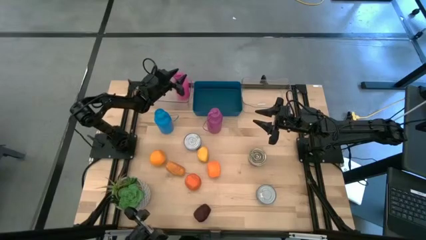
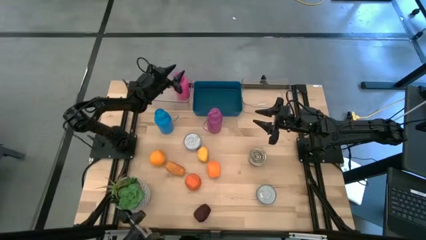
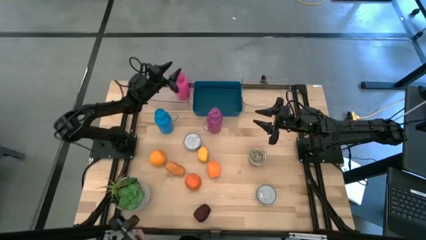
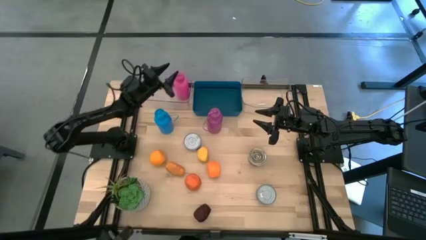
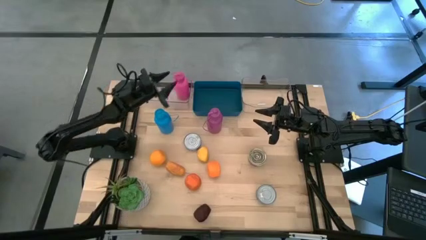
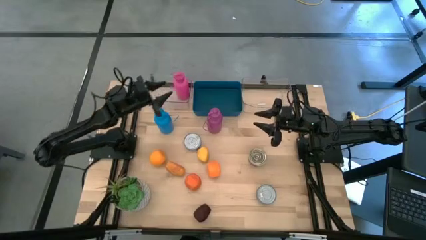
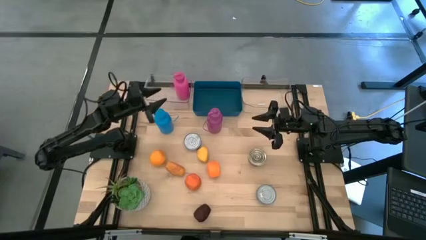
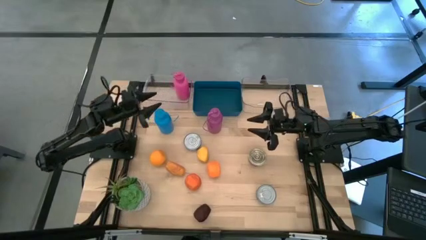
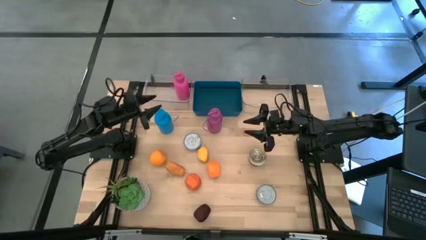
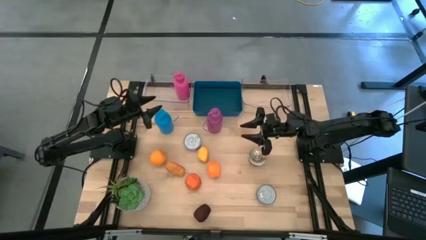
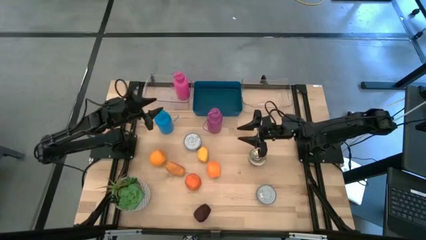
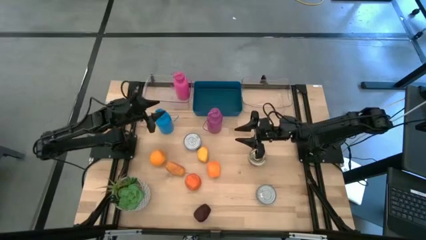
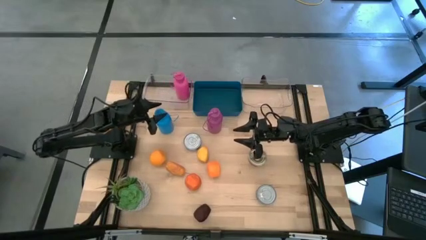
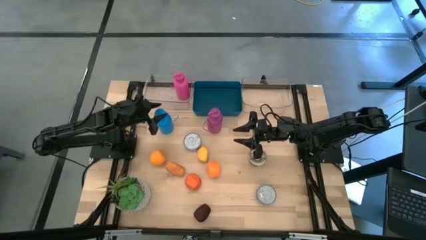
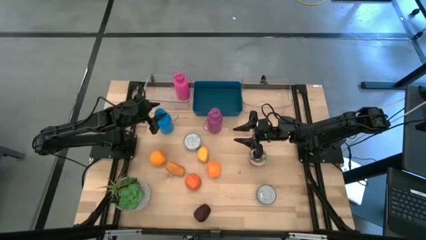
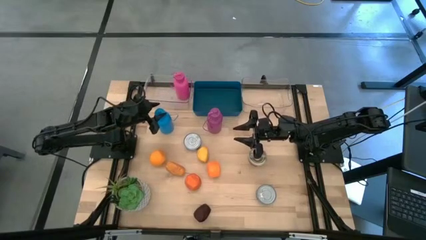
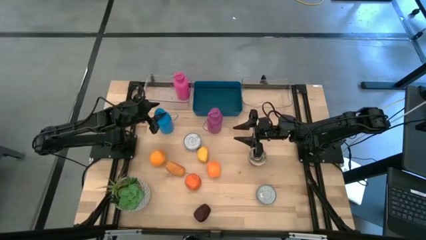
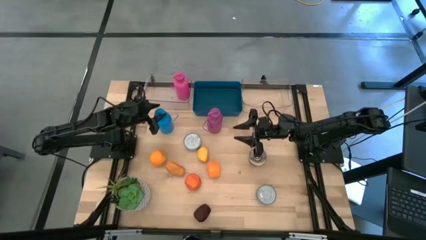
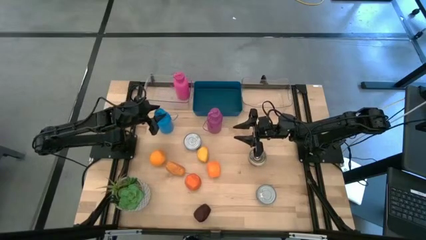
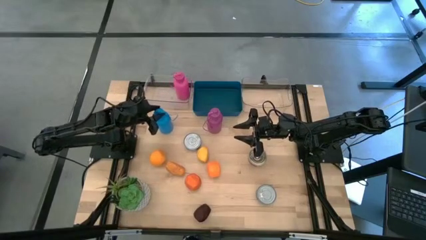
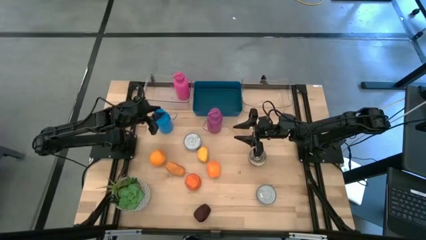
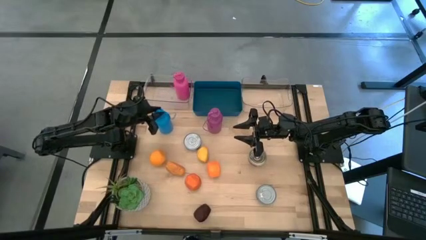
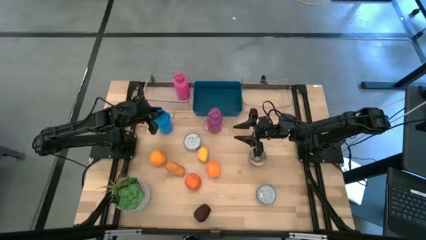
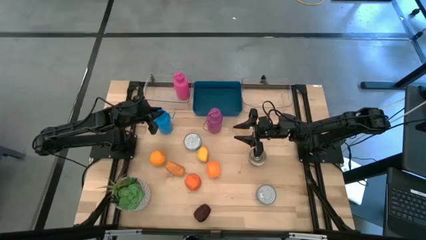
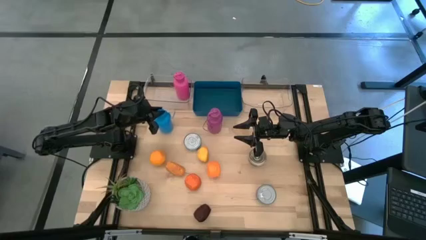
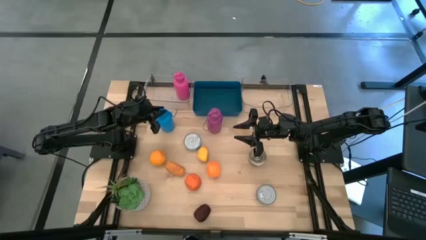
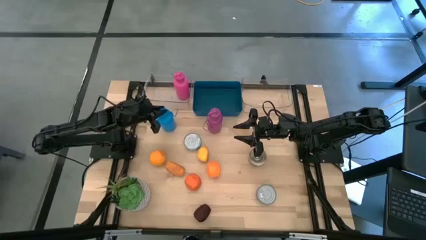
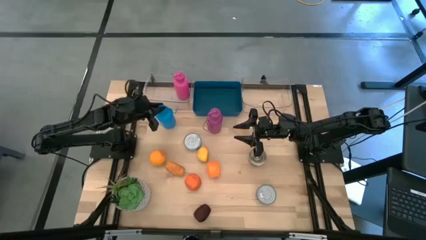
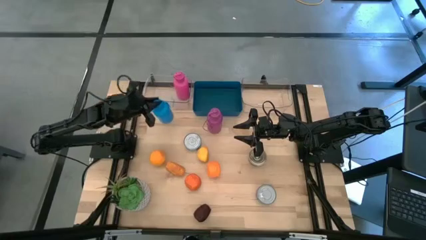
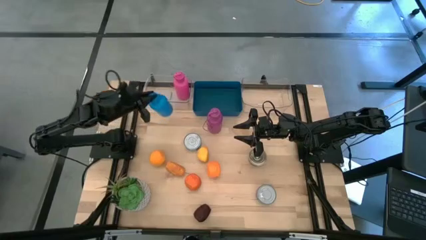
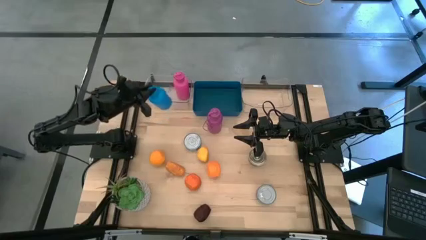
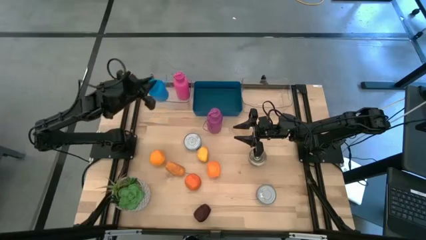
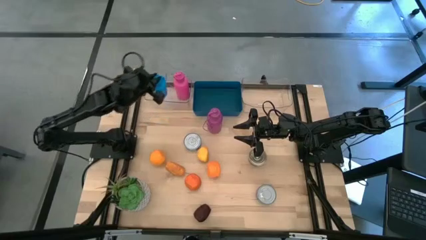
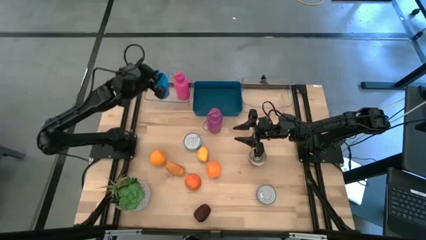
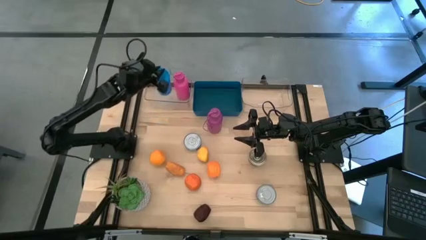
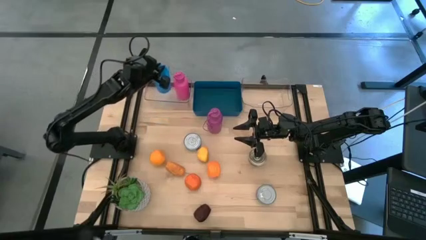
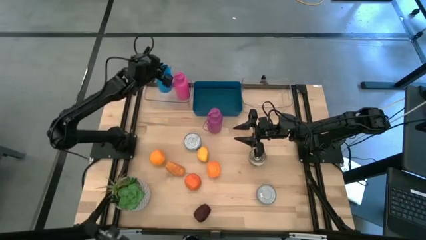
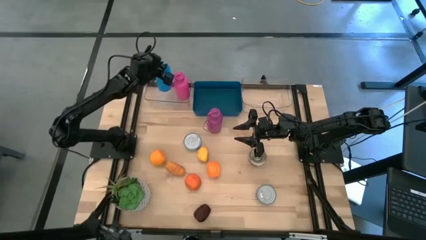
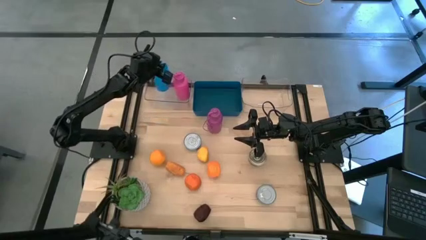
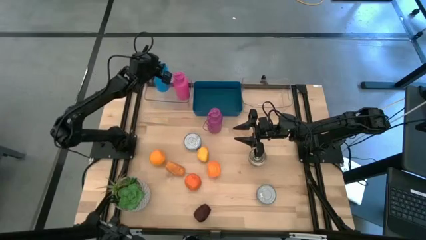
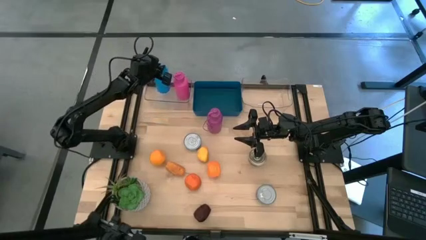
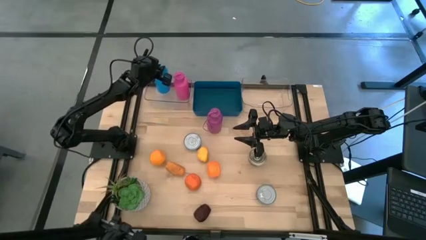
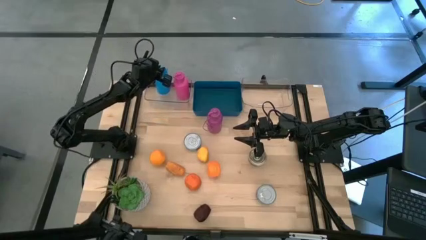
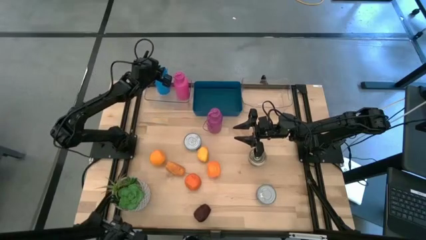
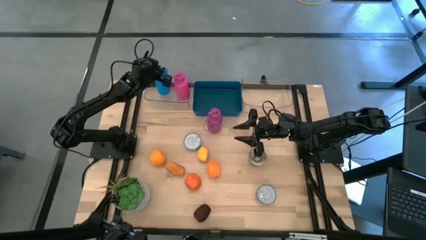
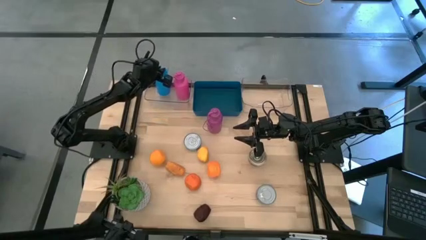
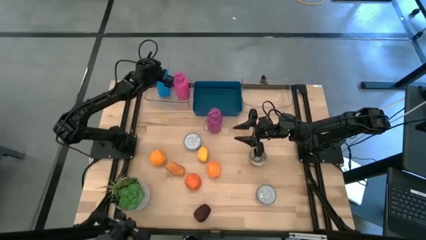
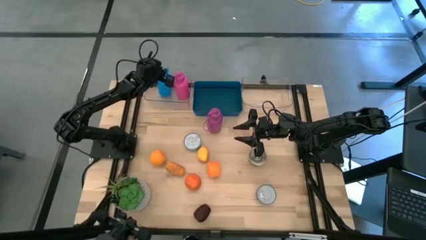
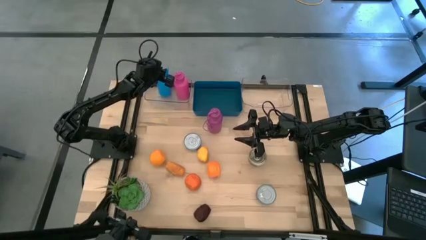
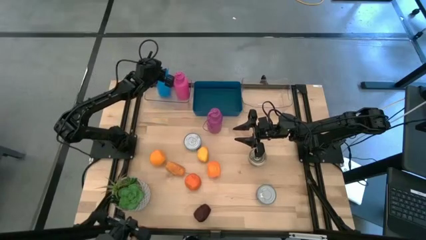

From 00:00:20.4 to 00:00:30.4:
Task: Pick & Place Food Item
Put the blue bottle into the left transparent bin
